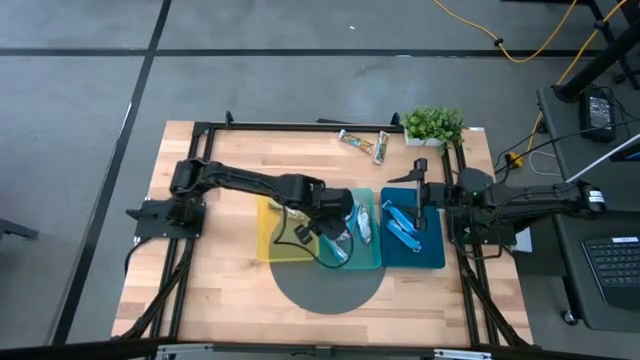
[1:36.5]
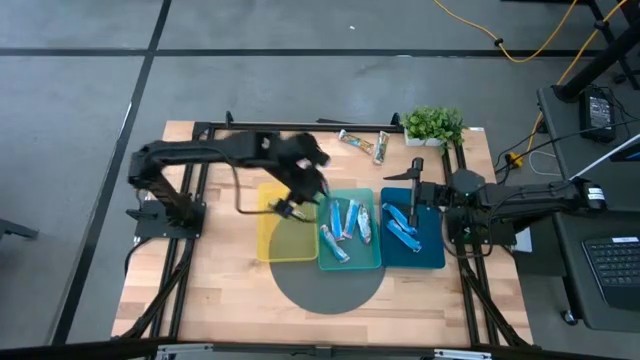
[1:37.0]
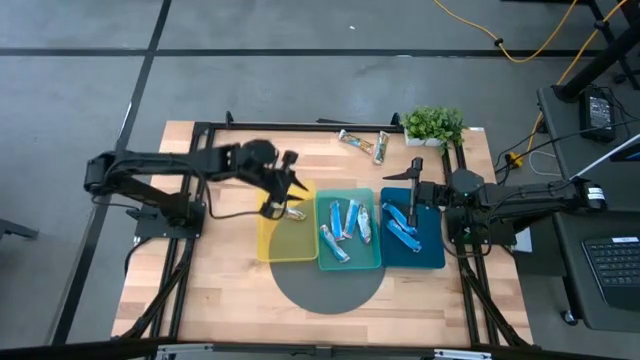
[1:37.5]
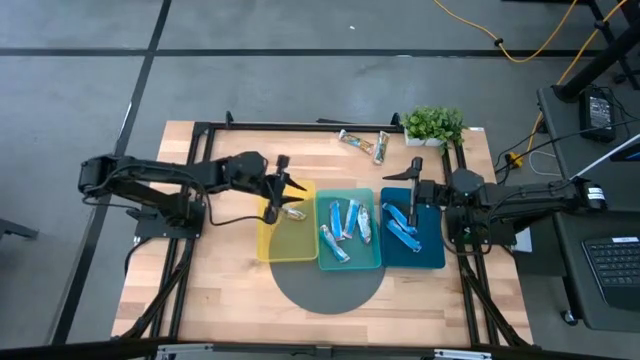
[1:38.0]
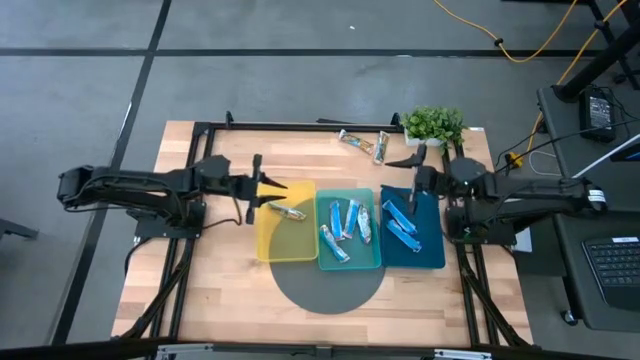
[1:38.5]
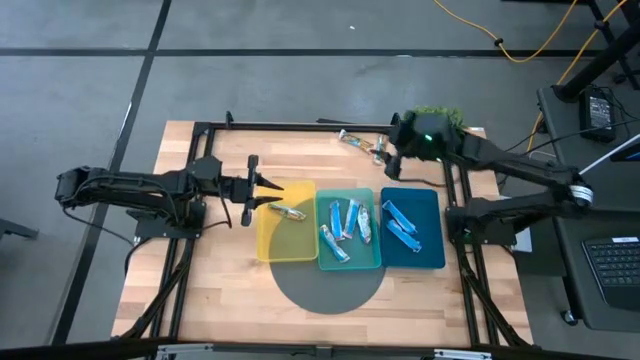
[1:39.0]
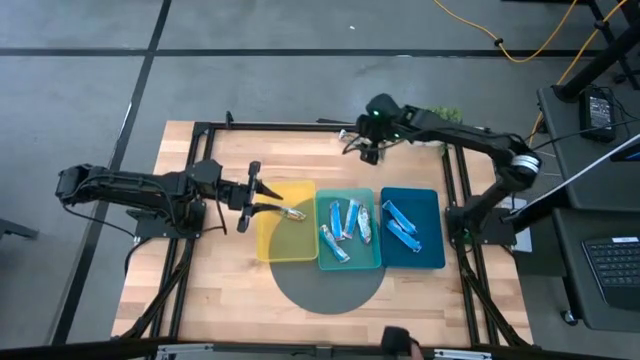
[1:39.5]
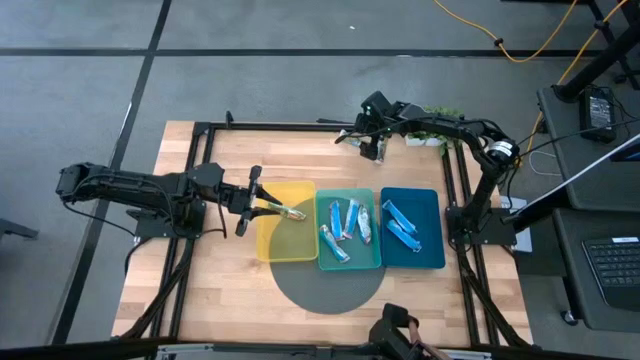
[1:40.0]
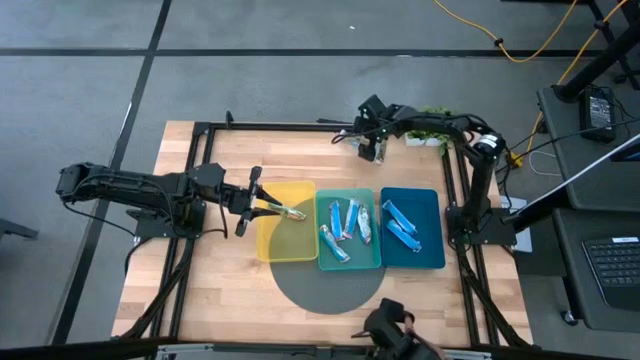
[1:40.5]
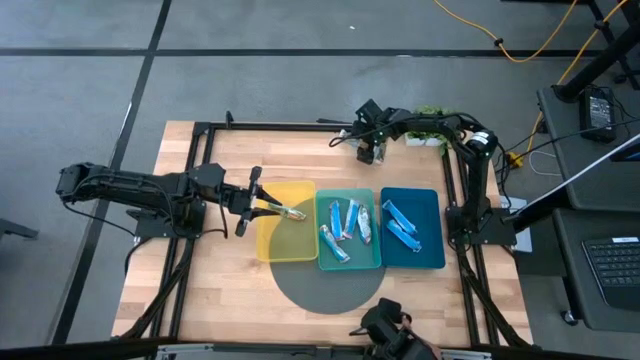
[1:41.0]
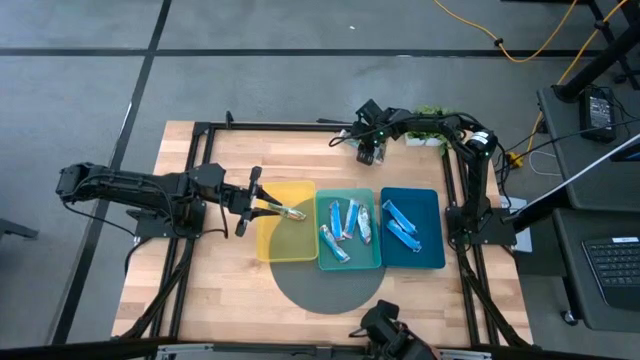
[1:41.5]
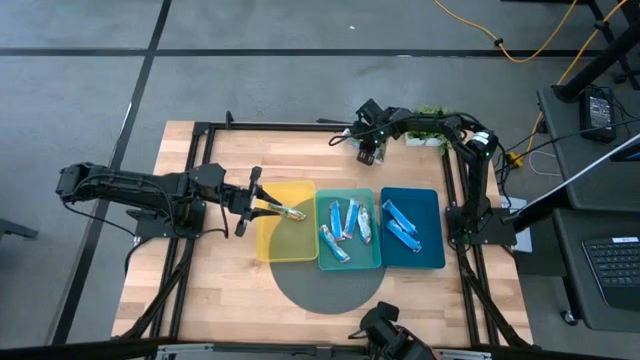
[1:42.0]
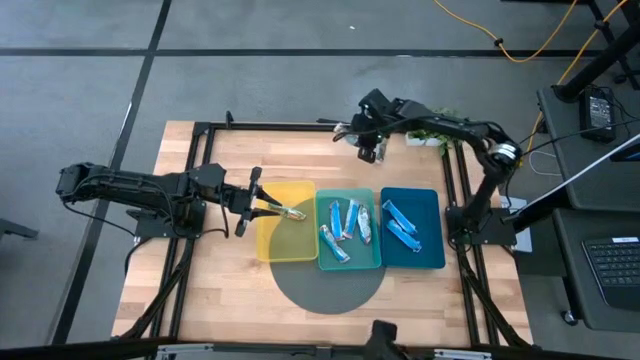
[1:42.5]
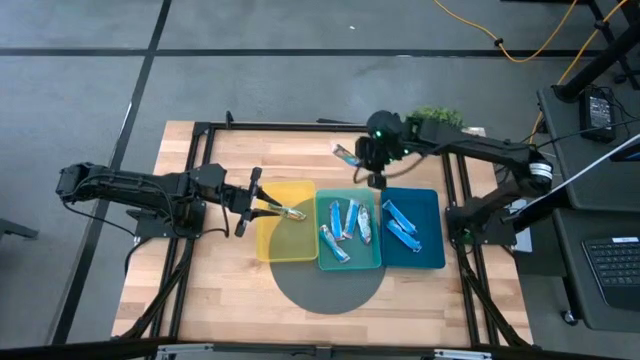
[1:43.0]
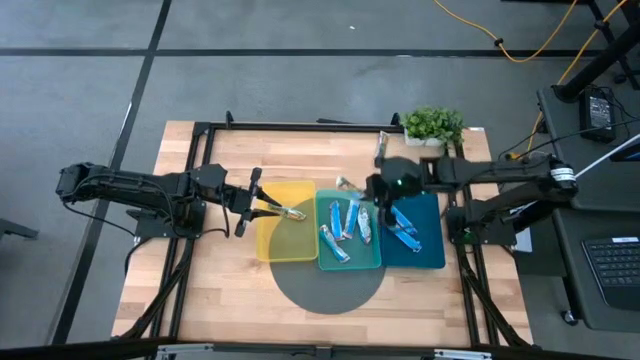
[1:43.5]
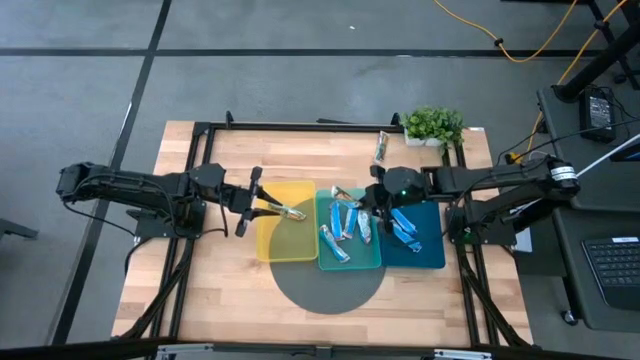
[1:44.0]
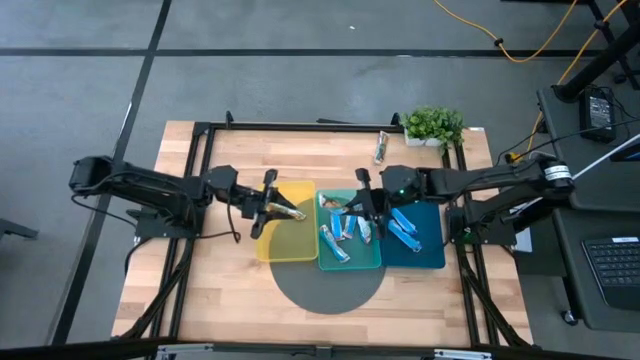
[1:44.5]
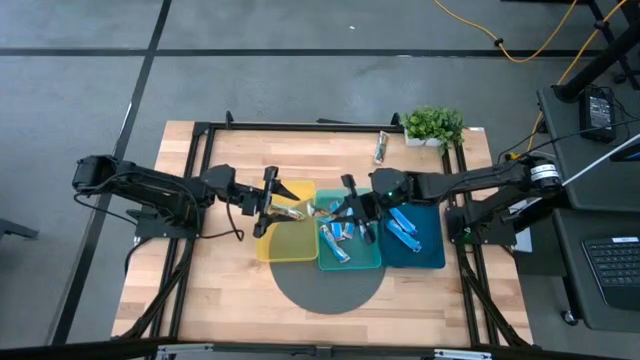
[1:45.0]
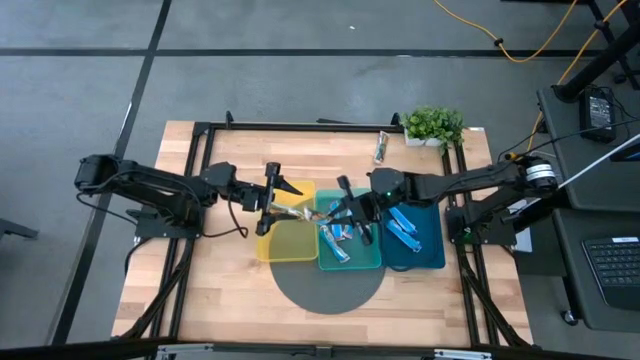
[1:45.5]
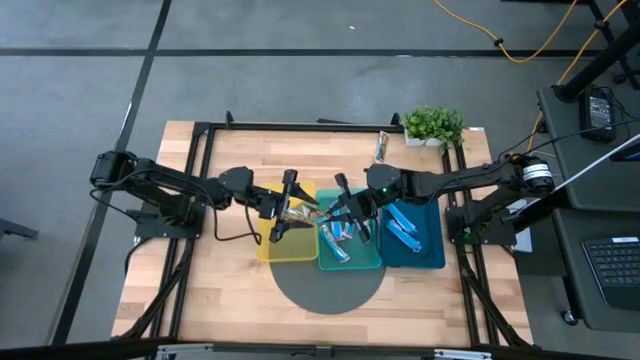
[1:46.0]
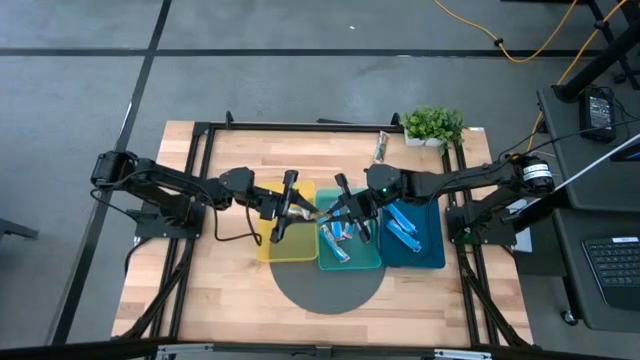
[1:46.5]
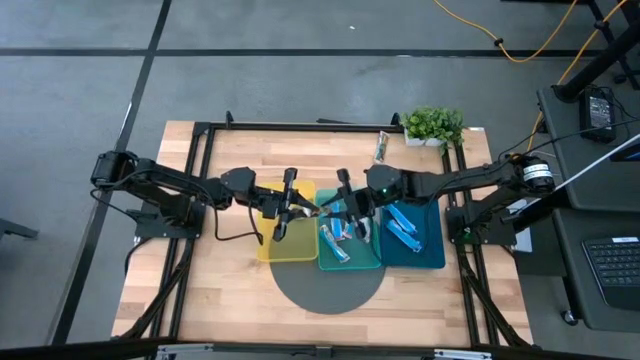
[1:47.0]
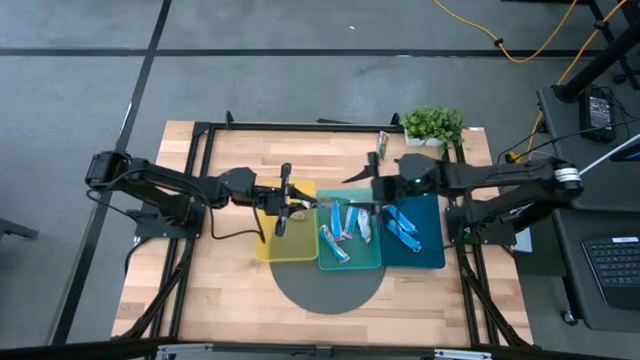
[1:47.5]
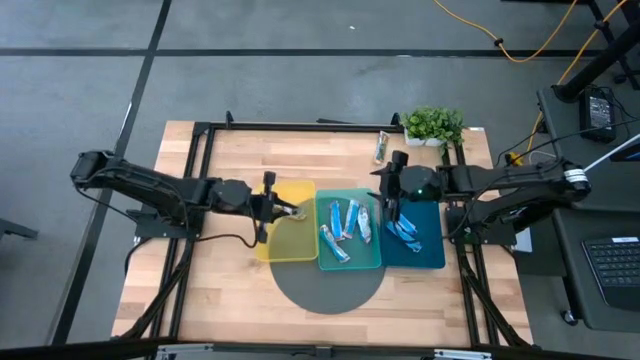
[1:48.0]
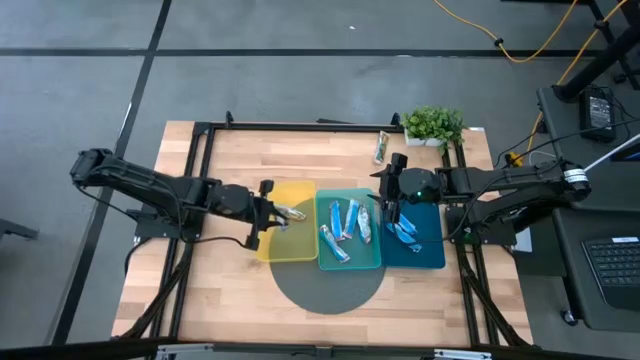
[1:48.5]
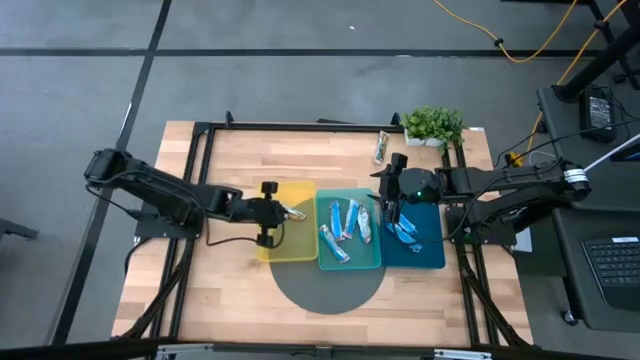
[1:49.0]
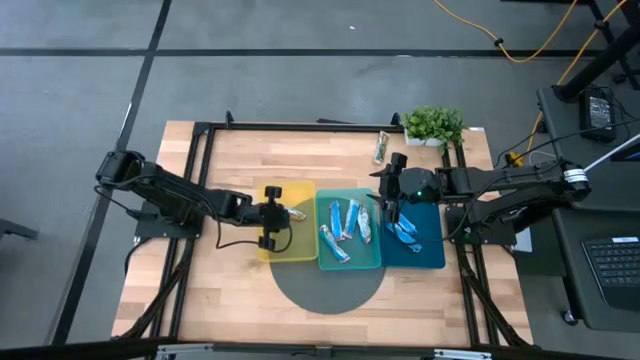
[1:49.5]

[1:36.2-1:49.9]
Task: Pick and place Granola Bars by type
Put the yellow granola bar into the yellow bin

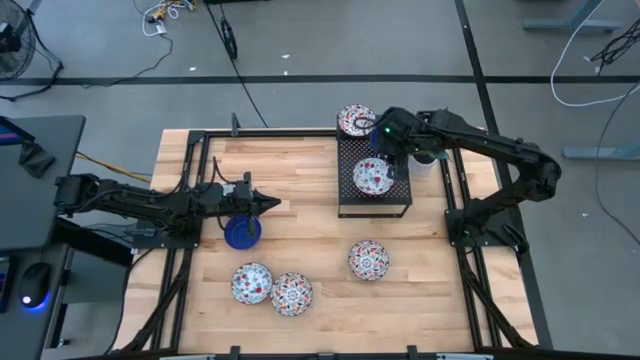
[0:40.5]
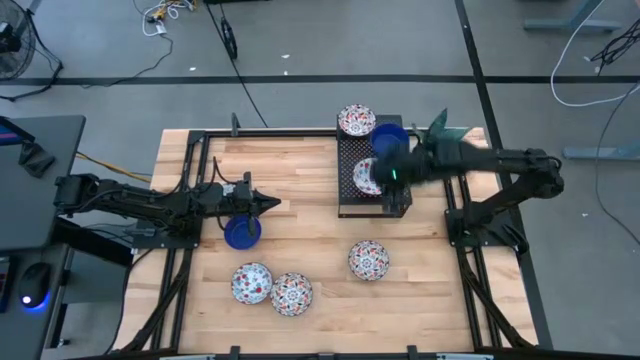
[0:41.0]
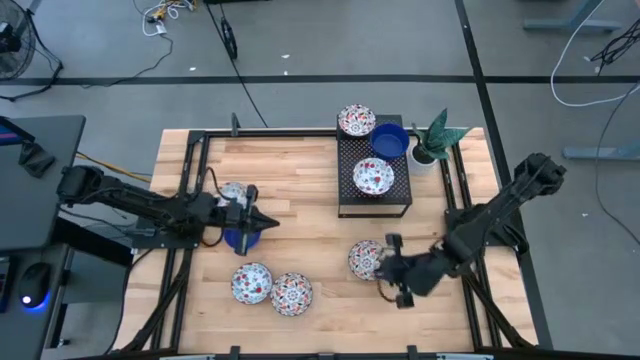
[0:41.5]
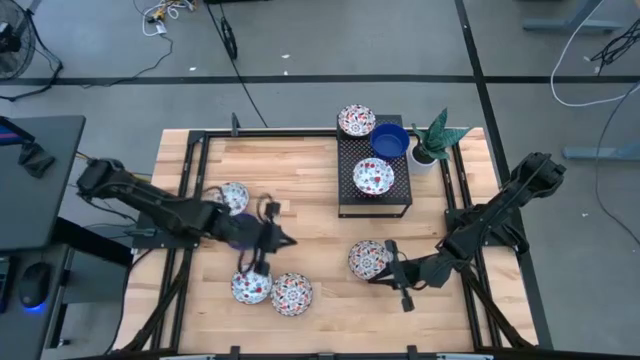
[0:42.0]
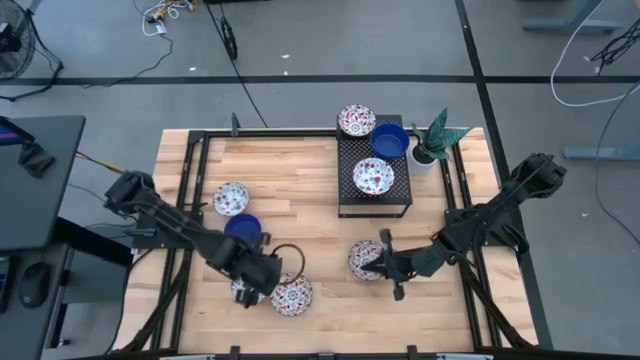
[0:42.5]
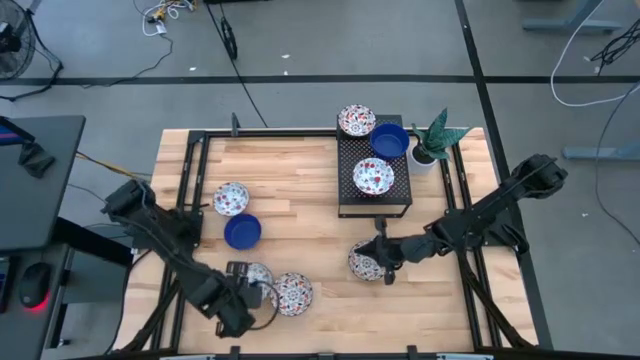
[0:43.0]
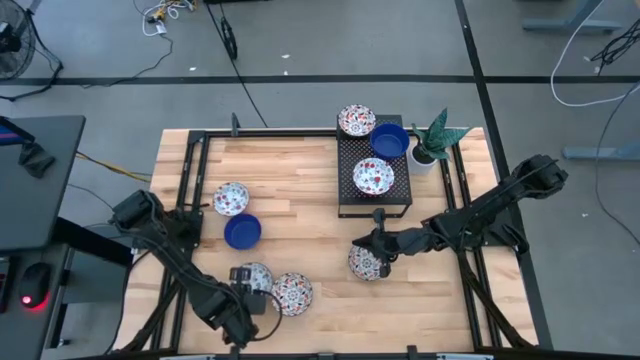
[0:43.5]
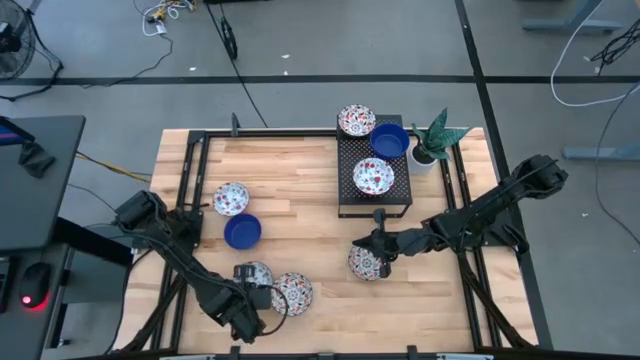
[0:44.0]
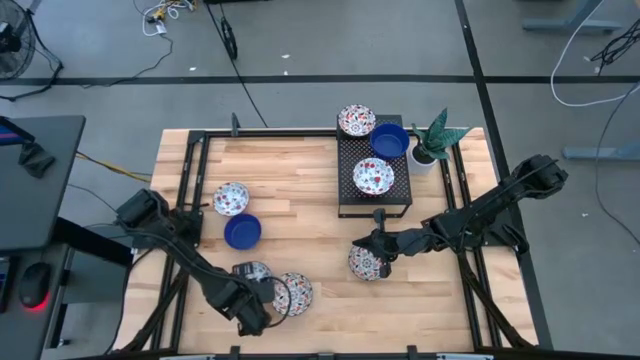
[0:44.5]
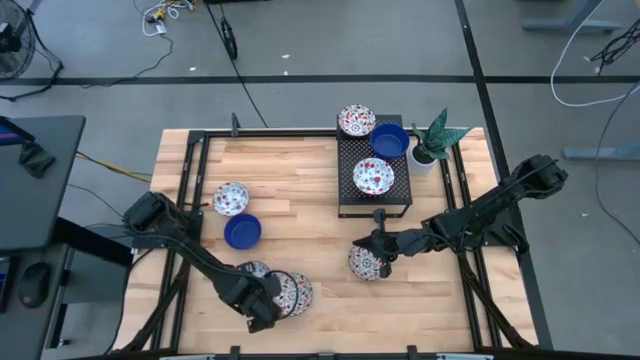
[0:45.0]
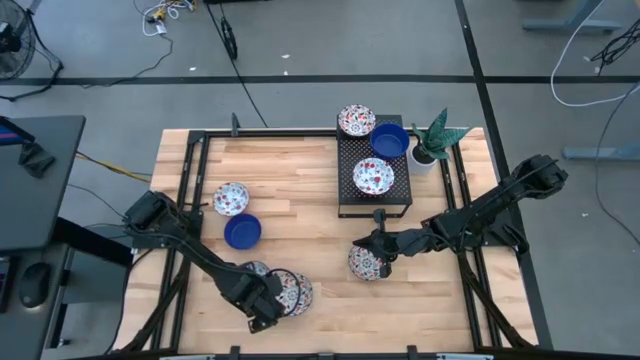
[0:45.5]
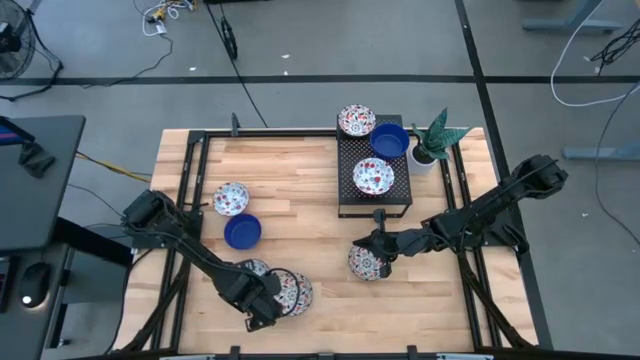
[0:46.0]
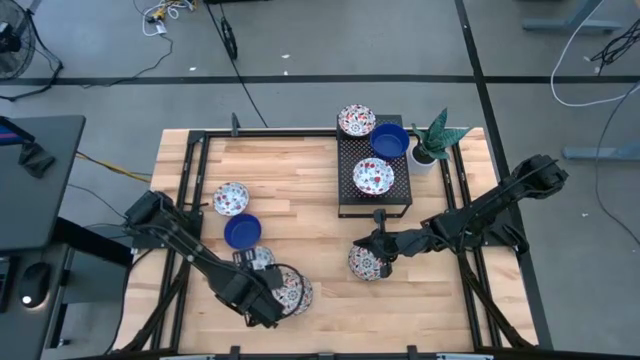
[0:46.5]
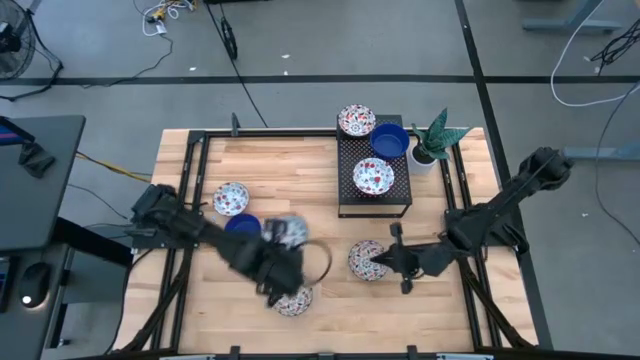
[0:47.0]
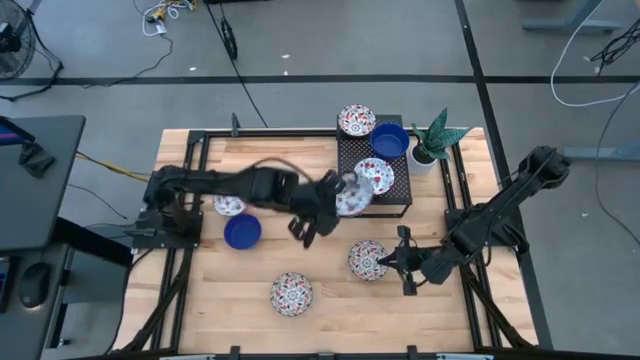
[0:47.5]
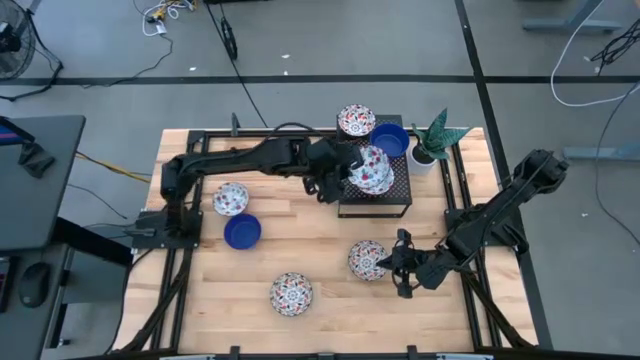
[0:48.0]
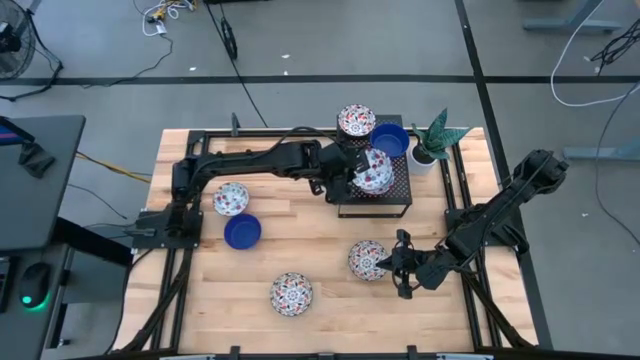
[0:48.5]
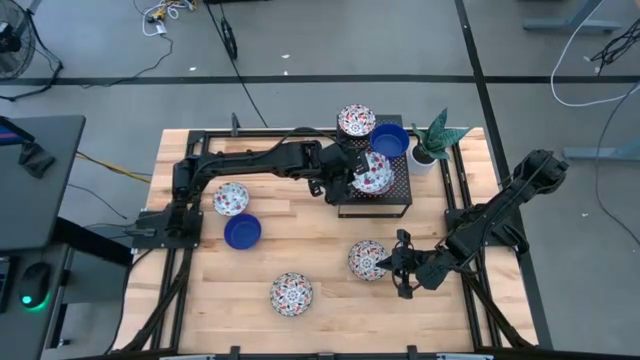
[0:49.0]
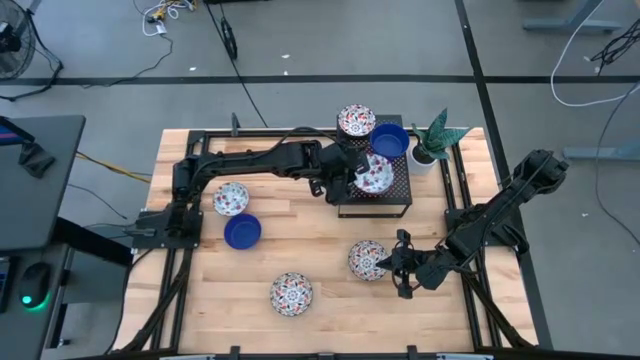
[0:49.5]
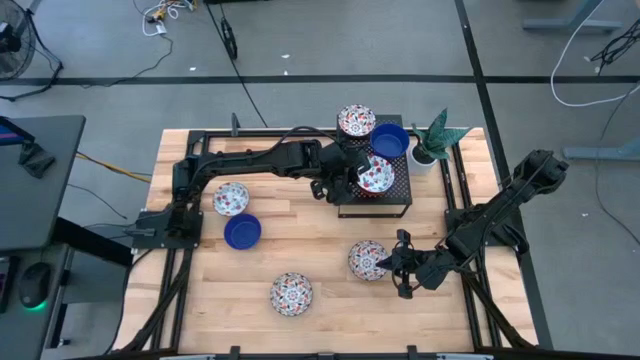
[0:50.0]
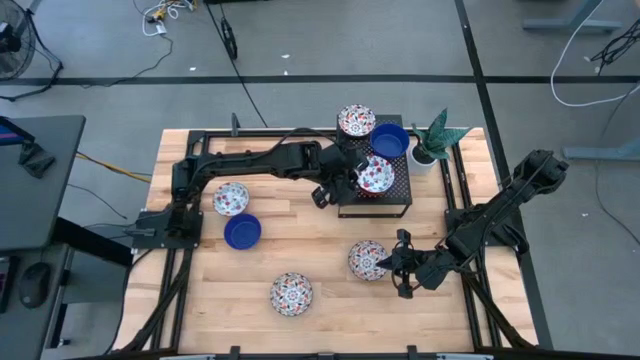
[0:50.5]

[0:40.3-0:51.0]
Task: Pick & Place Mini bowls
Stack the bottom red patterned bowl on top of the other red bowl on the shelf
